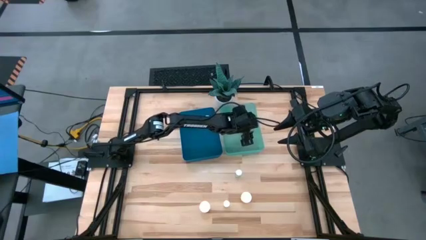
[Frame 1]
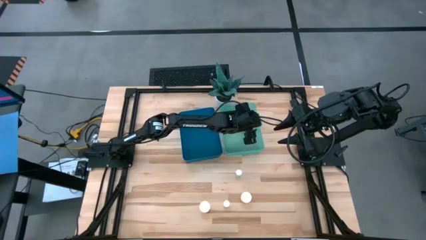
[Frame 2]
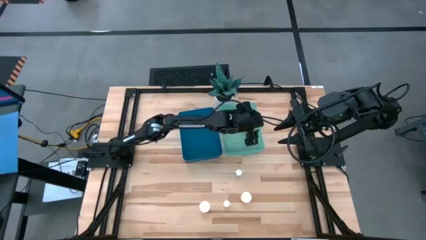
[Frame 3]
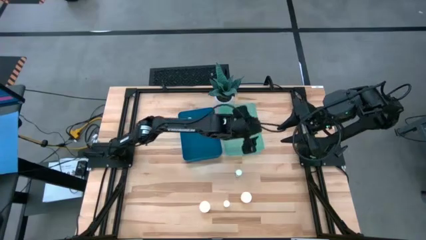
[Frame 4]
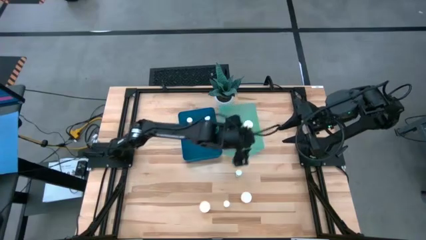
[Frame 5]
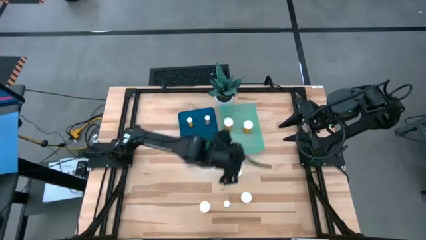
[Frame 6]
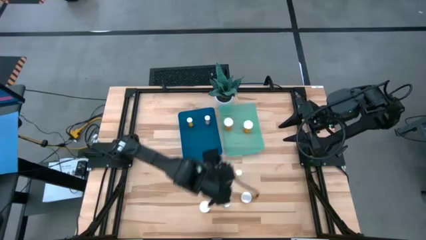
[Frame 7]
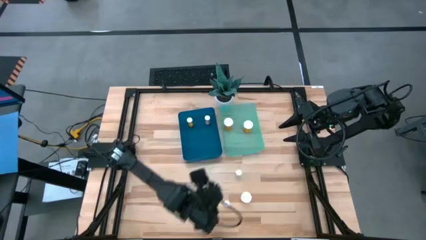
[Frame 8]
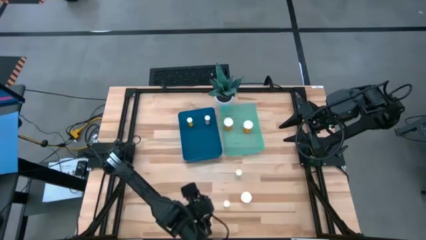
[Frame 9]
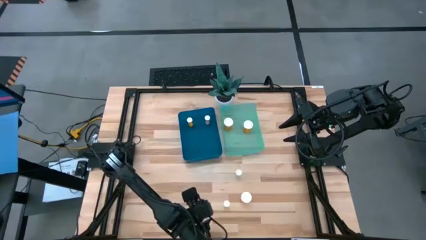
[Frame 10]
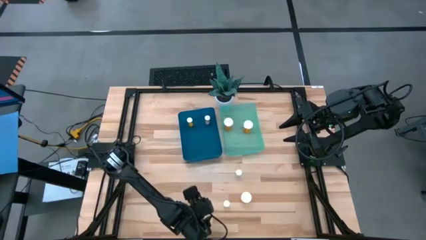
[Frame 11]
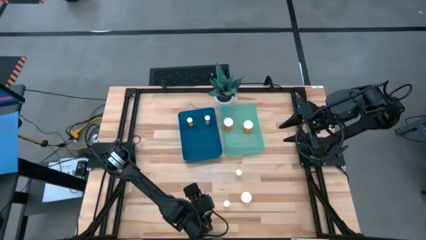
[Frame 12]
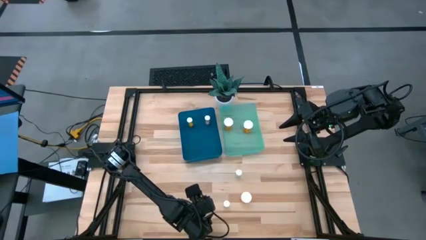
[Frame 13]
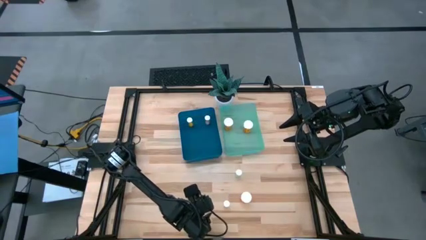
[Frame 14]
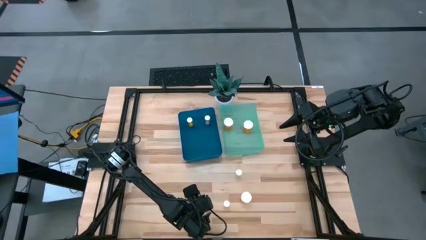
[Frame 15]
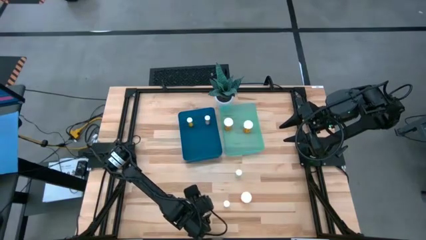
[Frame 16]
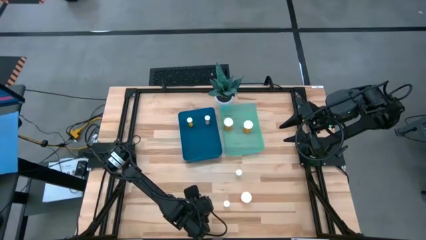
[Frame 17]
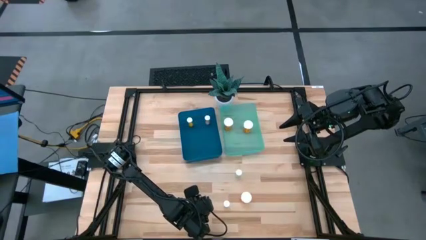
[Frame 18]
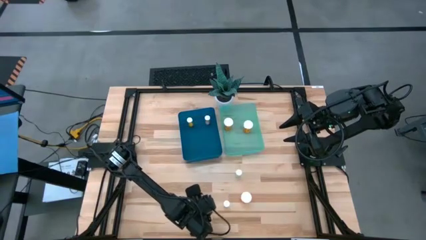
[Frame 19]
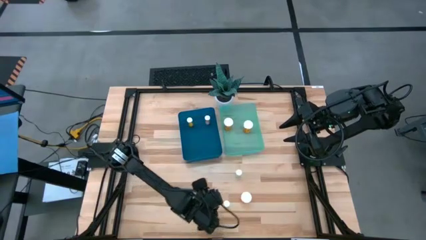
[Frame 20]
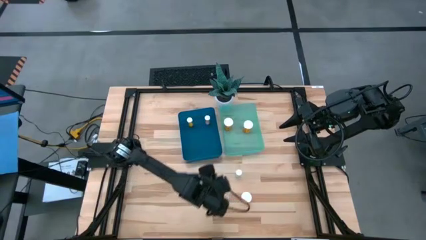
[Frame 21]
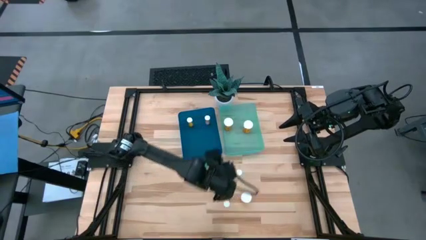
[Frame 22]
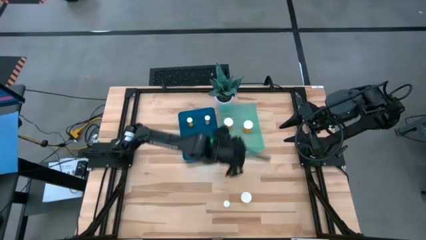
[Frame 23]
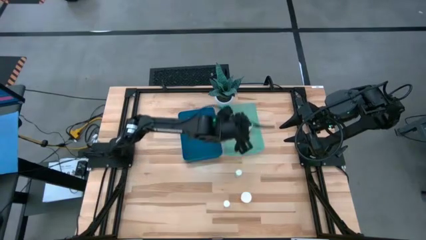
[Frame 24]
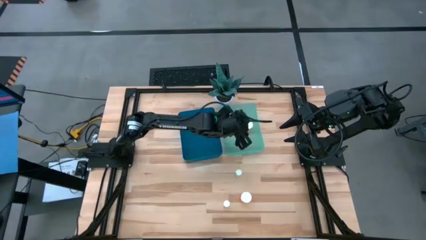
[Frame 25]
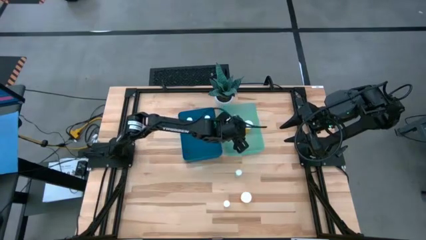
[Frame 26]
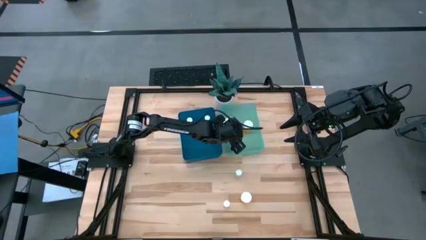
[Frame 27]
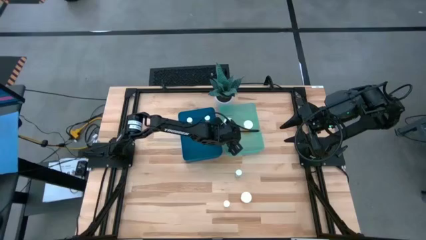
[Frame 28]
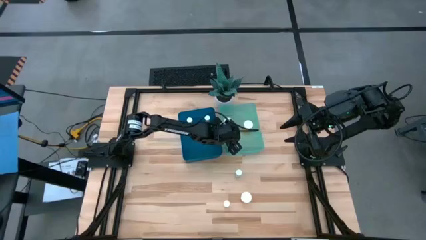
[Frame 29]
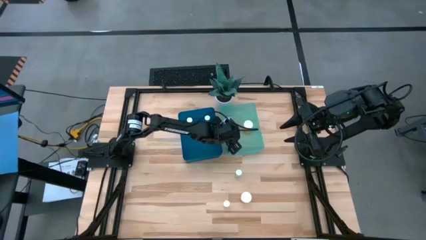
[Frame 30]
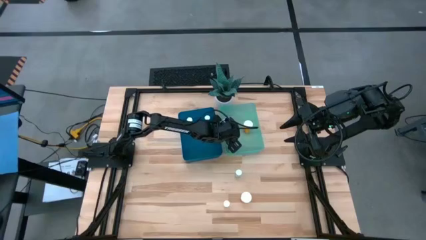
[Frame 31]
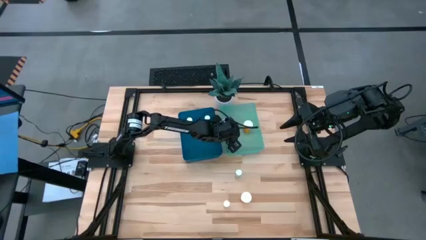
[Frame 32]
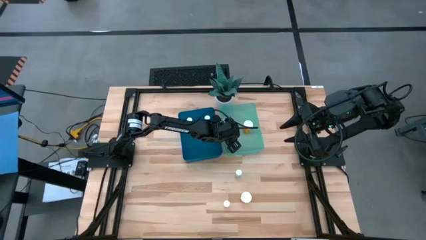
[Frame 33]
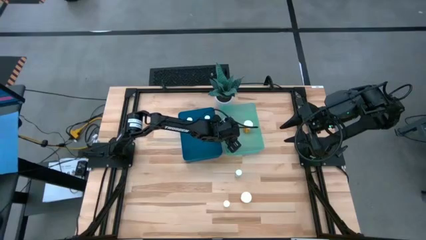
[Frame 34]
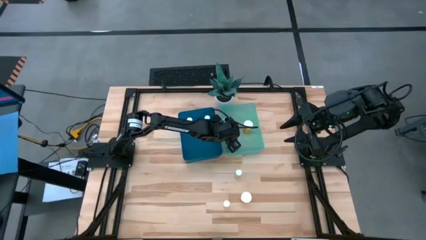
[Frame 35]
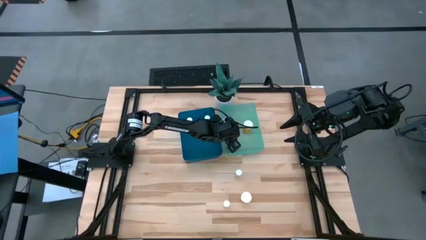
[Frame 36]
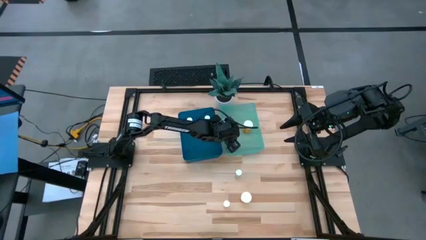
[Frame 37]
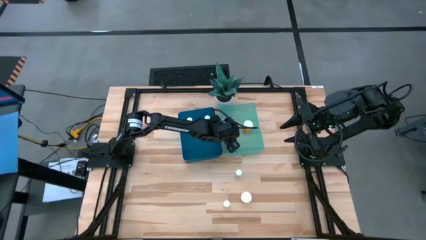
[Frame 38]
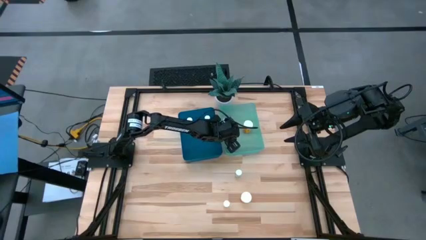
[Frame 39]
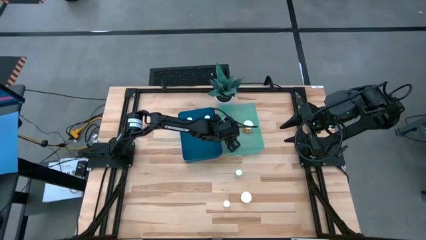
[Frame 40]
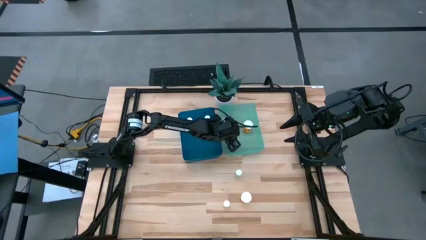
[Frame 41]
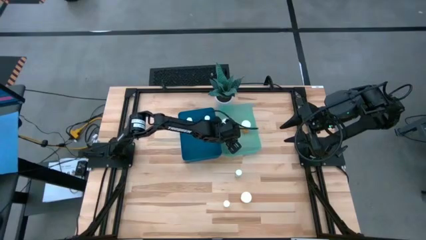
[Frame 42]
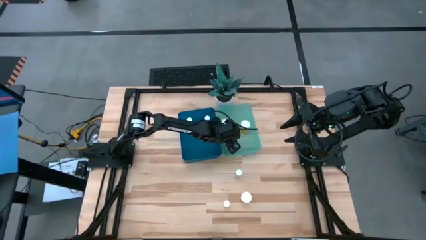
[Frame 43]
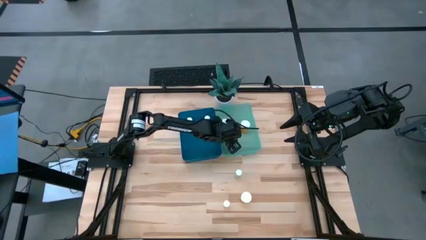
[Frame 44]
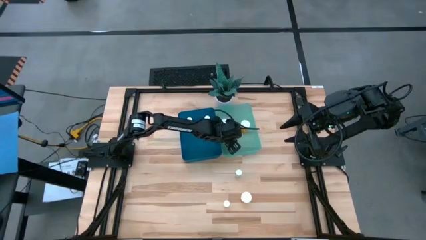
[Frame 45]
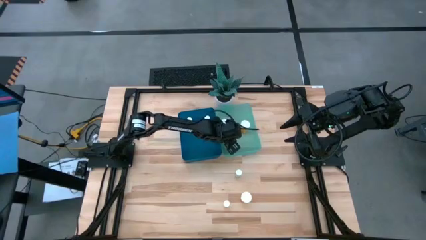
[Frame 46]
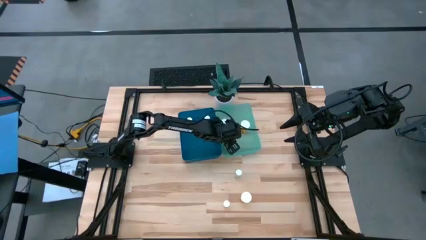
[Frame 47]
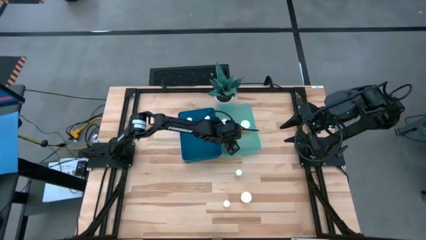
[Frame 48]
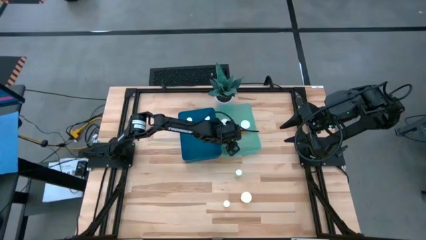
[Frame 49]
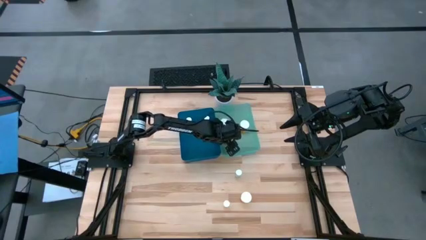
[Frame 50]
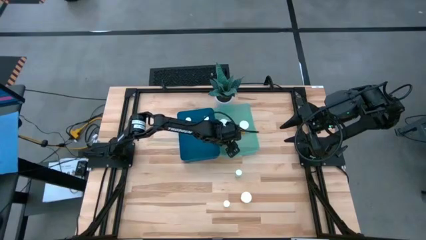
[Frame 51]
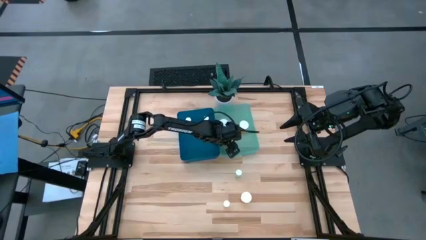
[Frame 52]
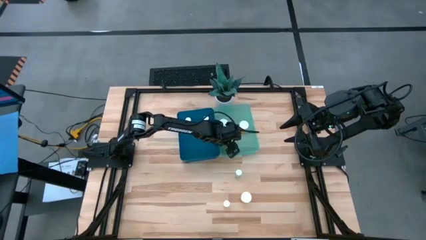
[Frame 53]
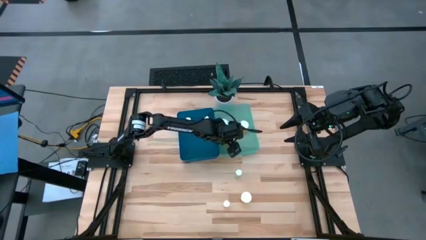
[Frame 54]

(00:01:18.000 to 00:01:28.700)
Task: Pick and place medicine bottles into bin by pill shape (circle, oval)
Put the large orange capsule bottle into the green bin

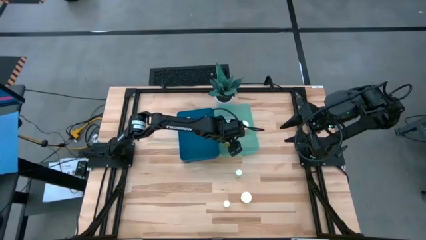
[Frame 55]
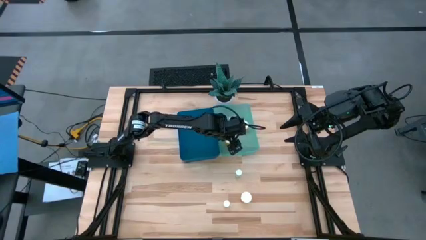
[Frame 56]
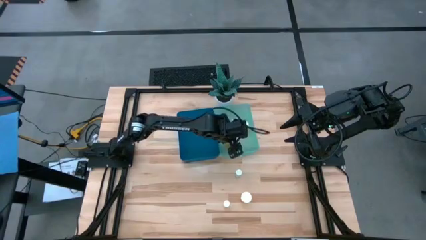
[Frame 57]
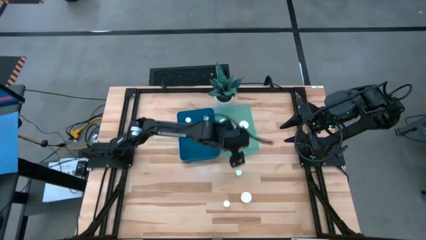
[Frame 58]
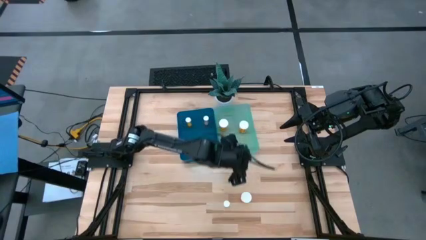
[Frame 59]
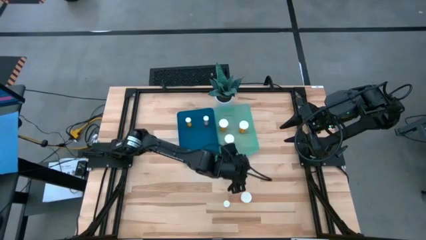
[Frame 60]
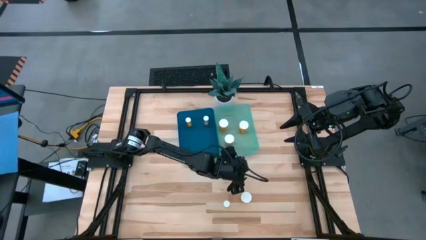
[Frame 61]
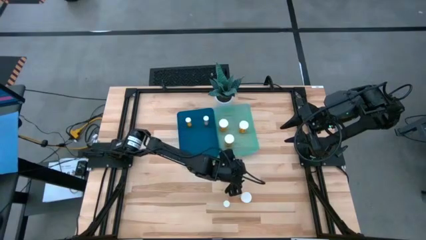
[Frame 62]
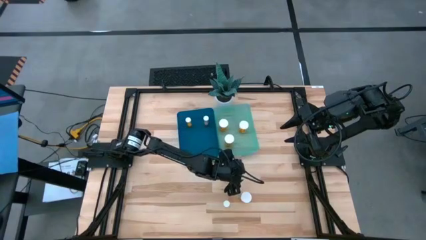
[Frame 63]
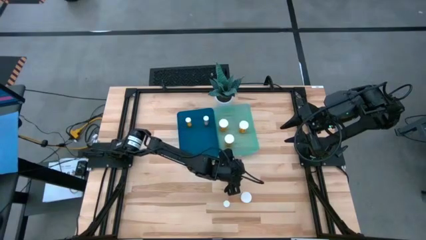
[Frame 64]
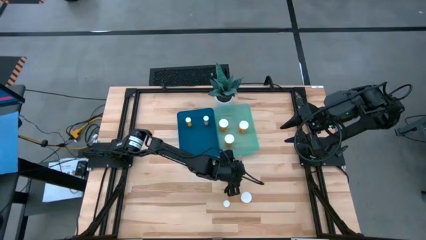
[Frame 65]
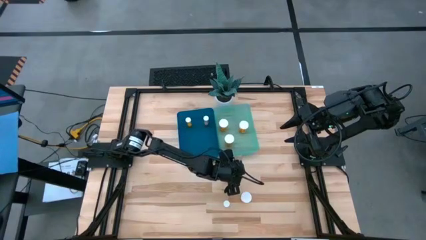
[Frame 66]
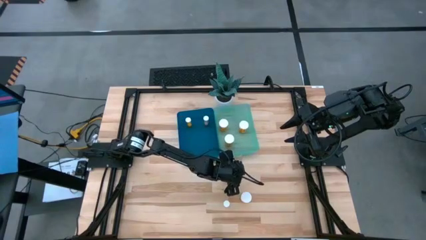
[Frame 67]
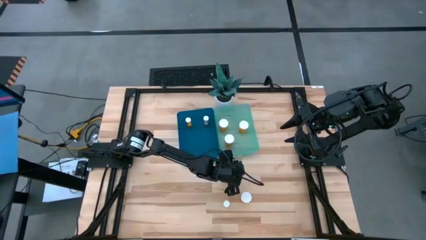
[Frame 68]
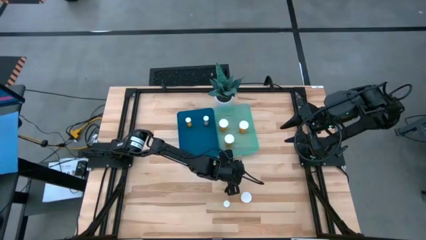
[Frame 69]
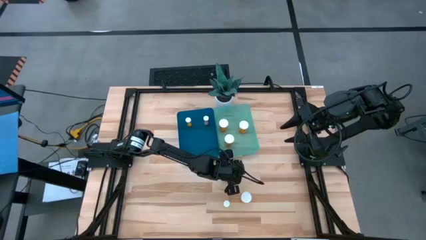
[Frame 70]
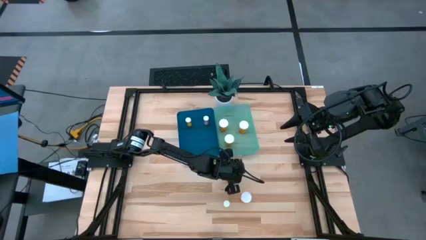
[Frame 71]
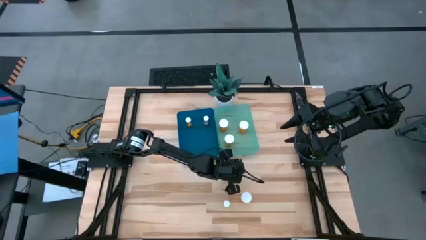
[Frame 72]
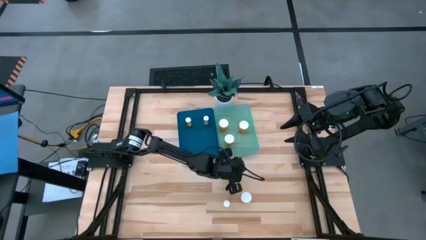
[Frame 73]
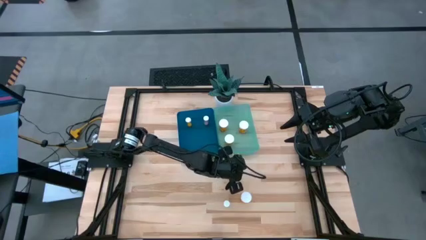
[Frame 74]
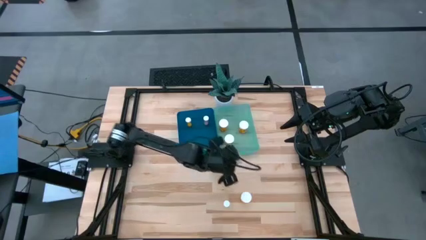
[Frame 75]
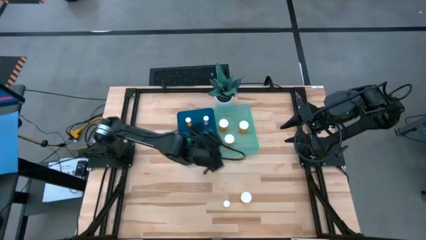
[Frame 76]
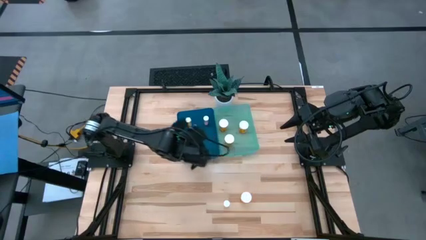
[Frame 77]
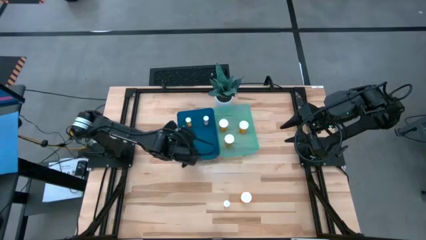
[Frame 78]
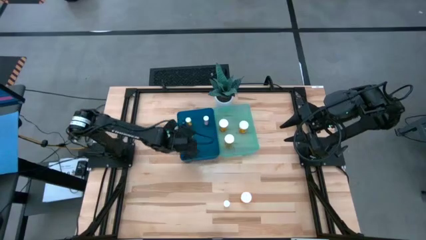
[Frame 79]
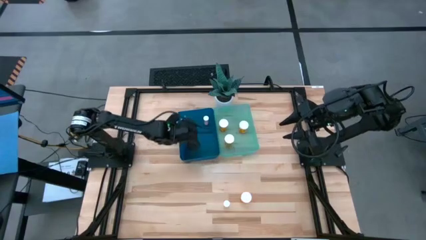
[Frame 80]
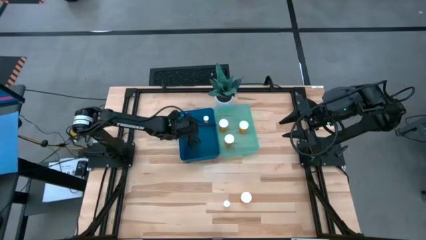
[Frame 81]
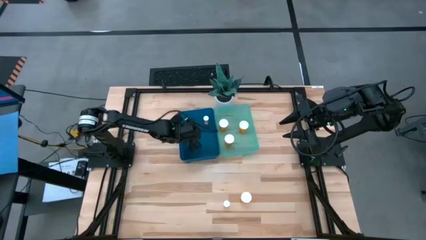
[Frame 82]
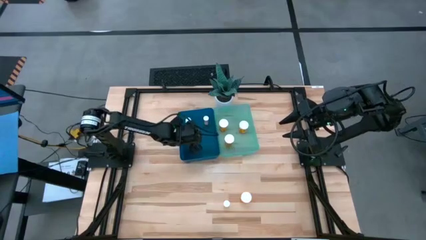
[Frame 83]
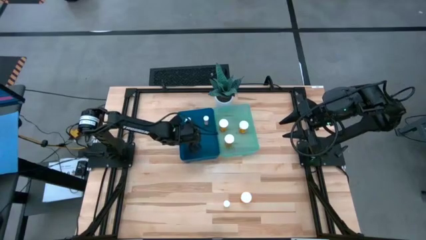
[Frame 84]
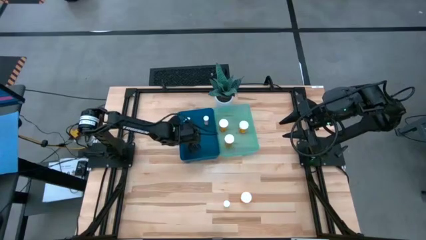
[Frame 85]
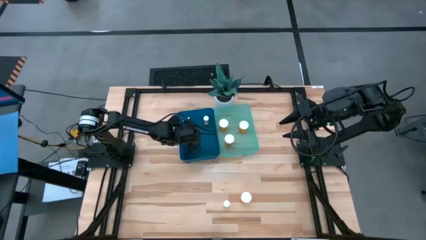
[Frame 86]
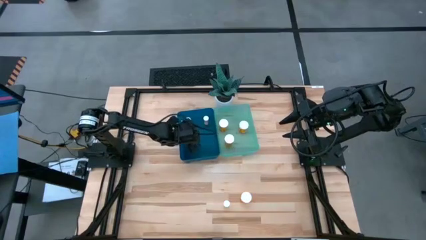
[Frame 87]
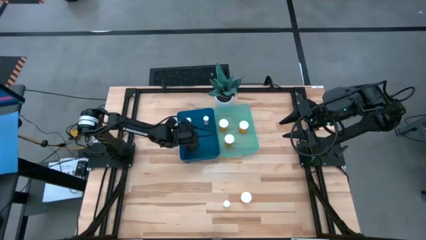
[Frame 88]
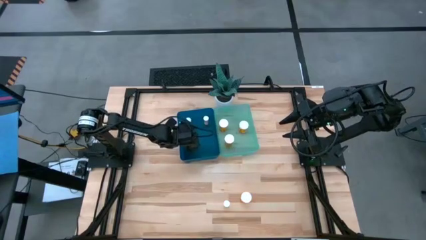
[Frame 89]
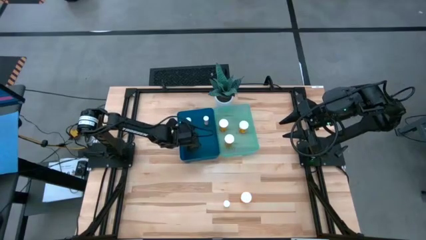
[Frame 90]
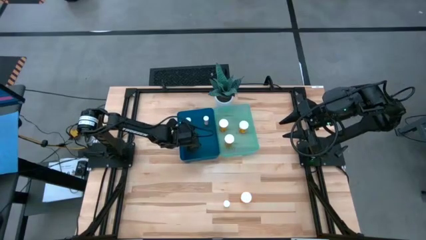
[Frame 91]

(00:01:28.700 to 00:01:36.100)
Put the small green tablet bottle into the blue bin
